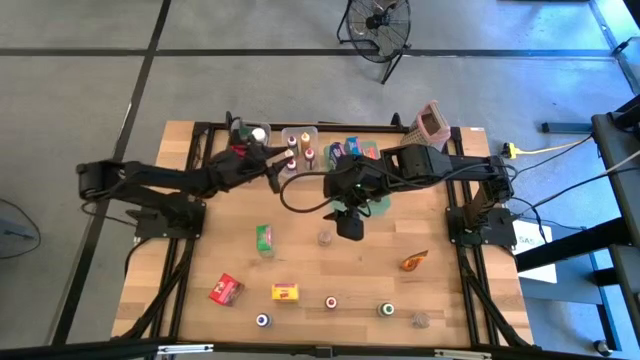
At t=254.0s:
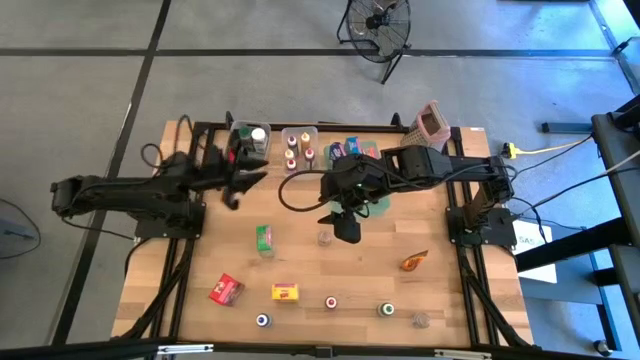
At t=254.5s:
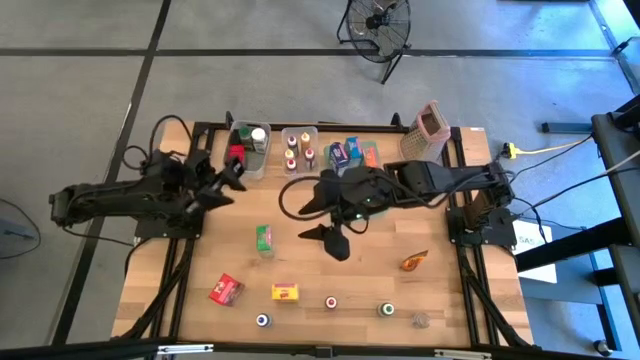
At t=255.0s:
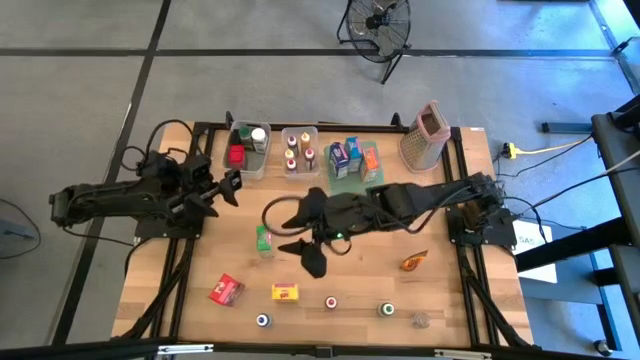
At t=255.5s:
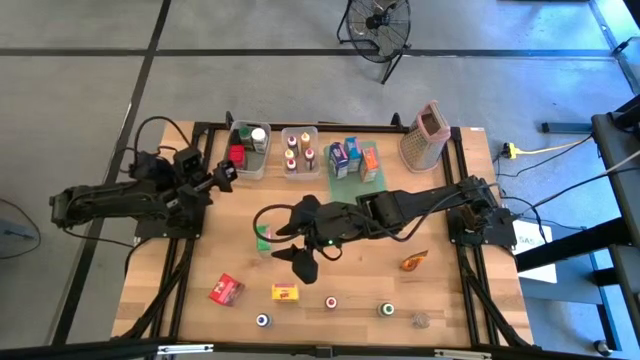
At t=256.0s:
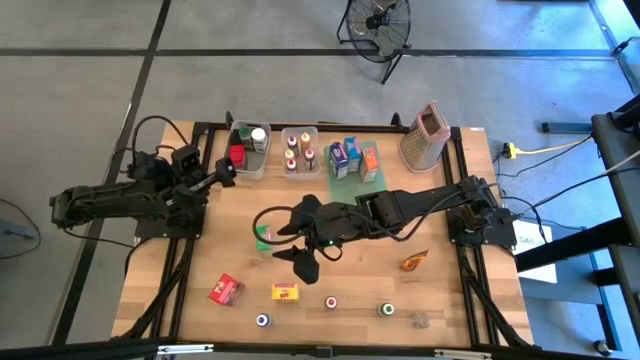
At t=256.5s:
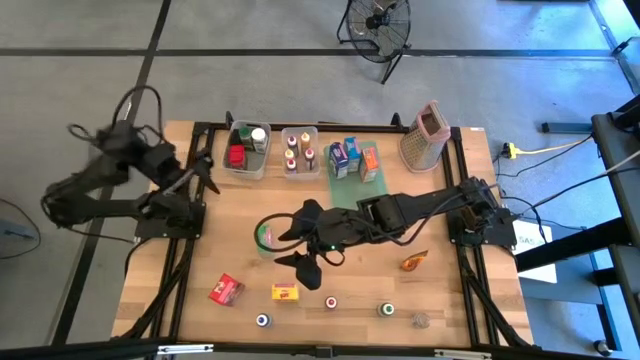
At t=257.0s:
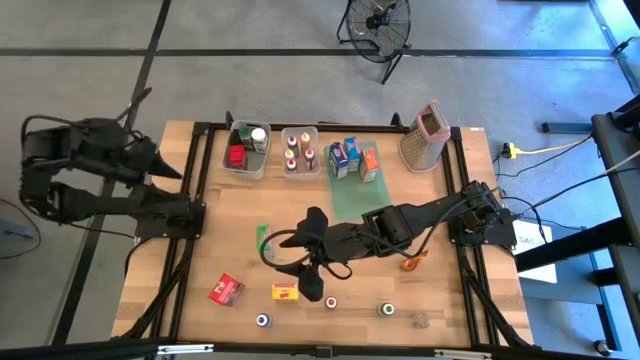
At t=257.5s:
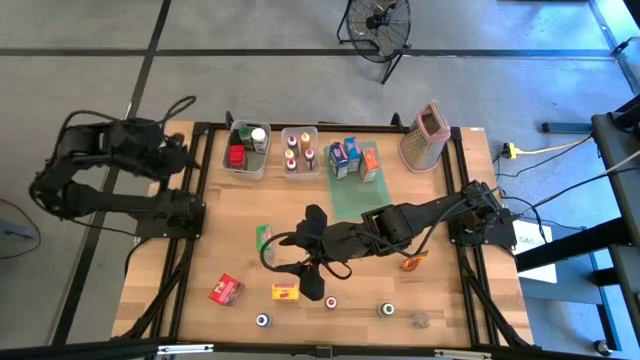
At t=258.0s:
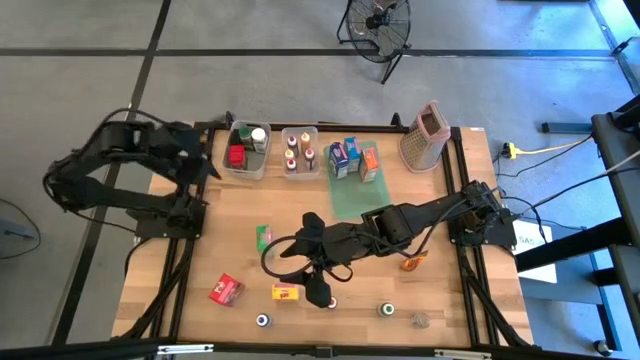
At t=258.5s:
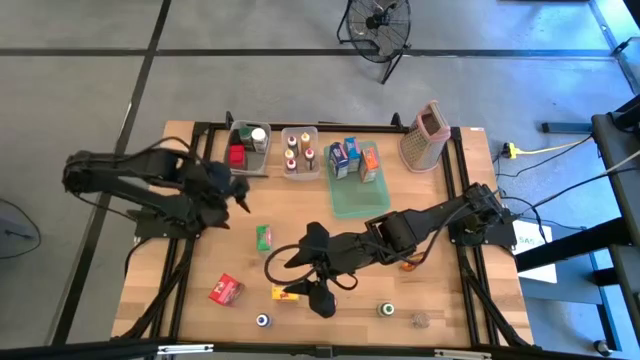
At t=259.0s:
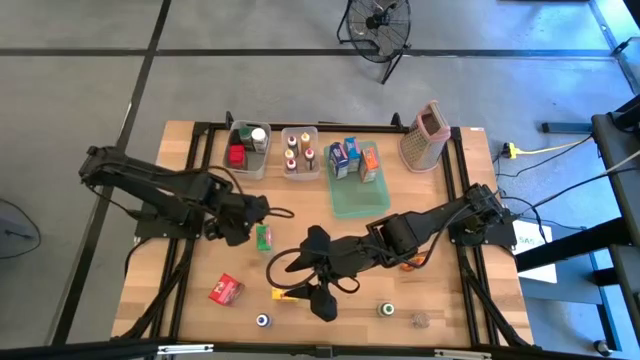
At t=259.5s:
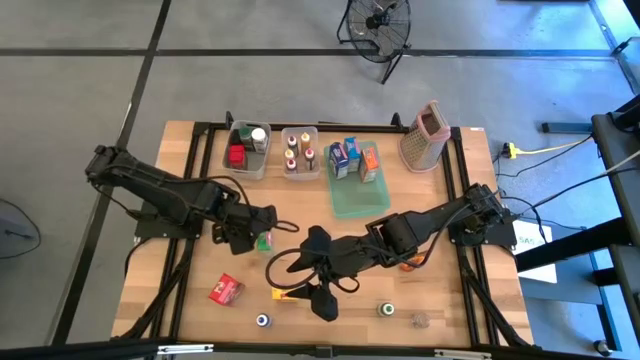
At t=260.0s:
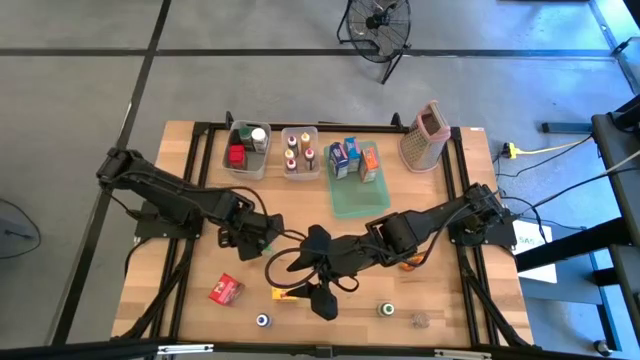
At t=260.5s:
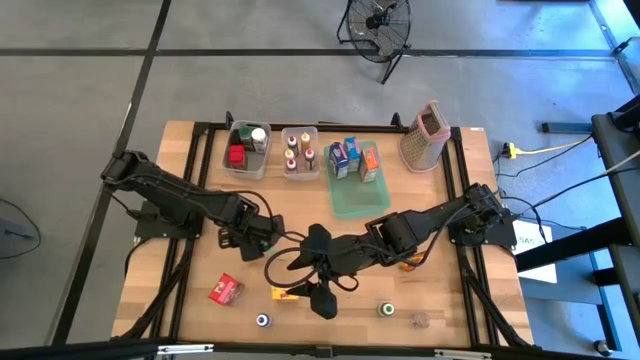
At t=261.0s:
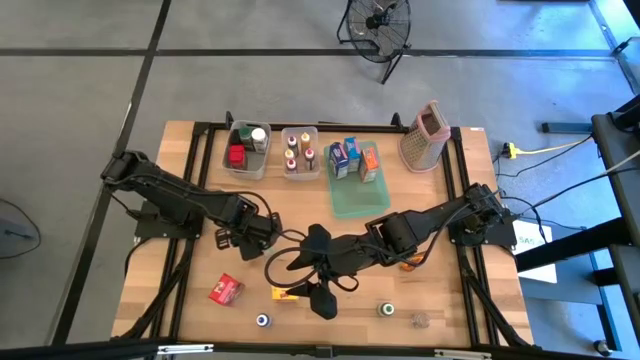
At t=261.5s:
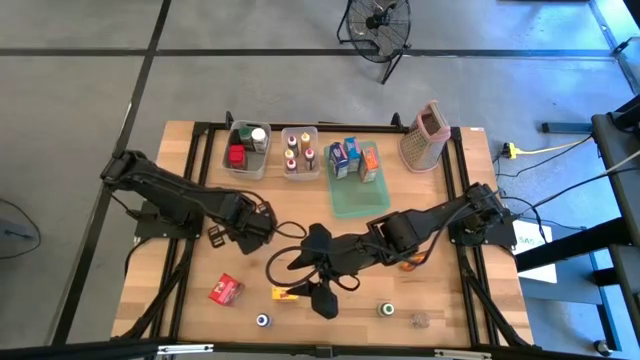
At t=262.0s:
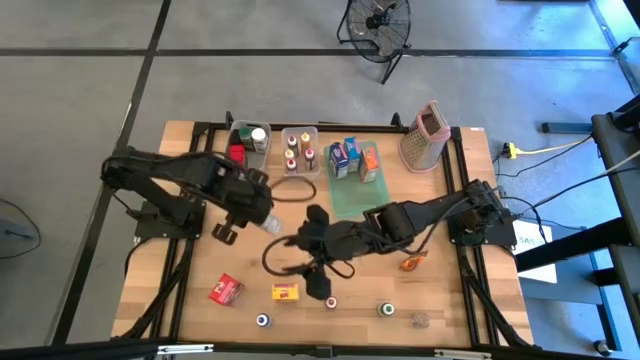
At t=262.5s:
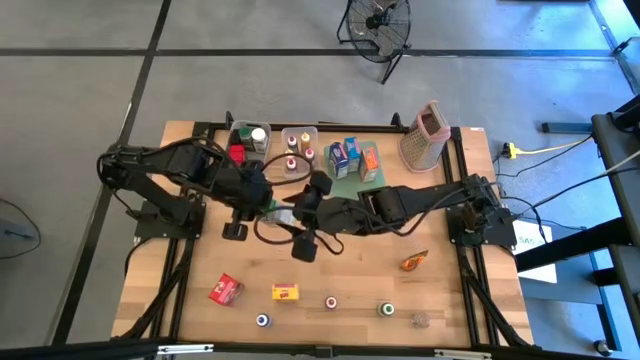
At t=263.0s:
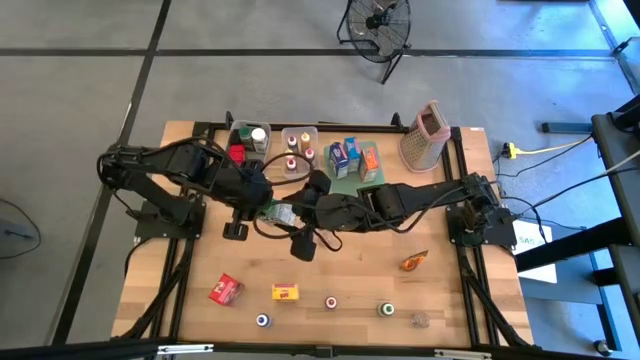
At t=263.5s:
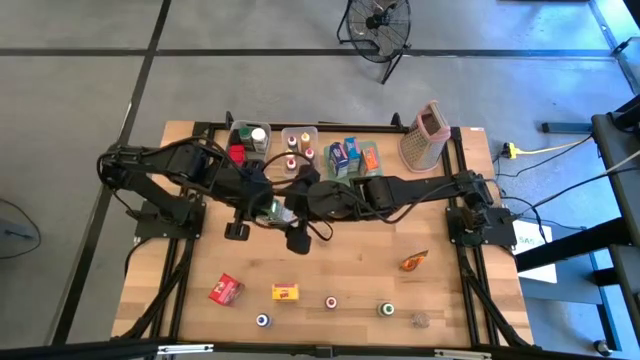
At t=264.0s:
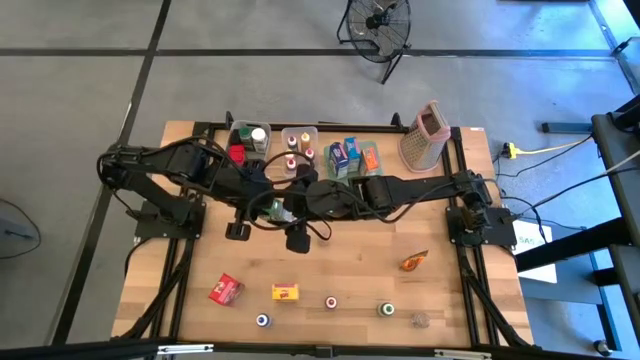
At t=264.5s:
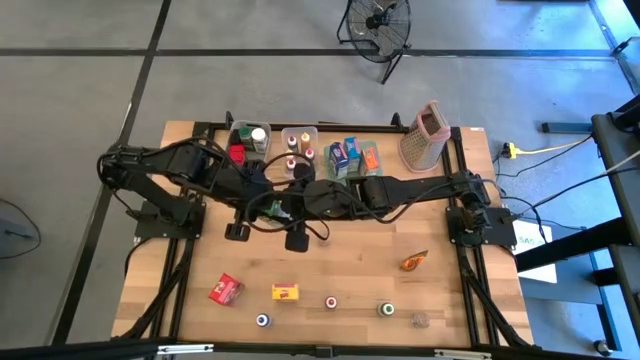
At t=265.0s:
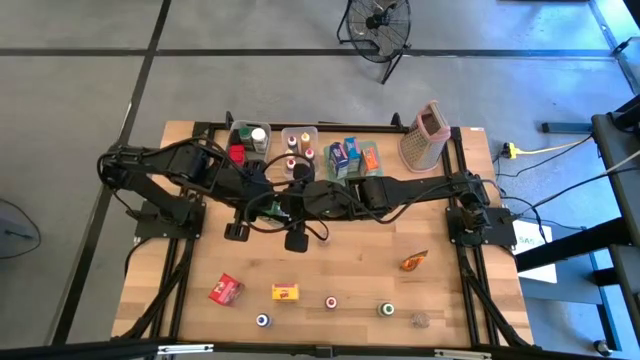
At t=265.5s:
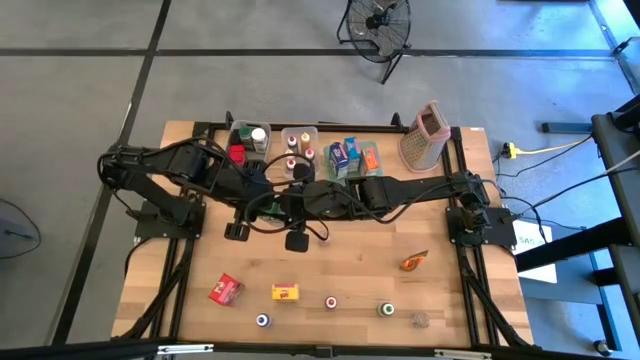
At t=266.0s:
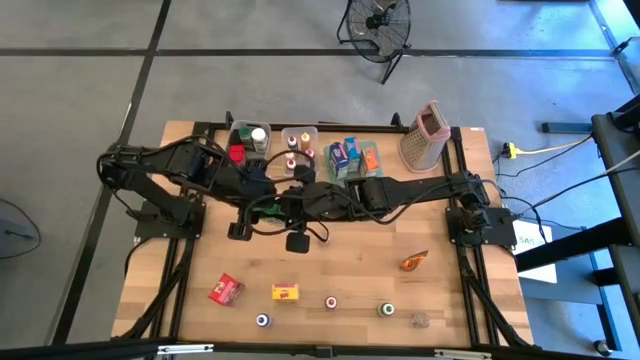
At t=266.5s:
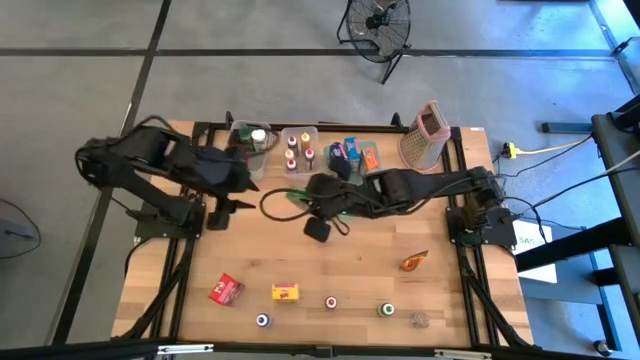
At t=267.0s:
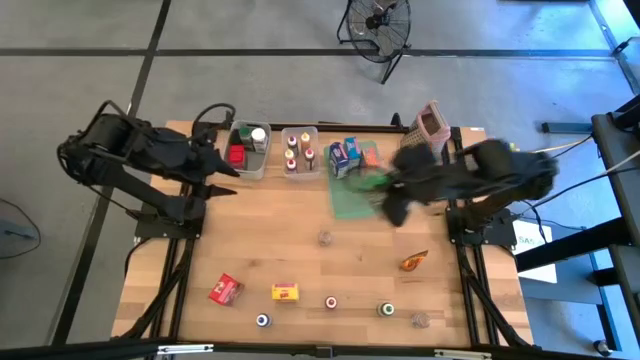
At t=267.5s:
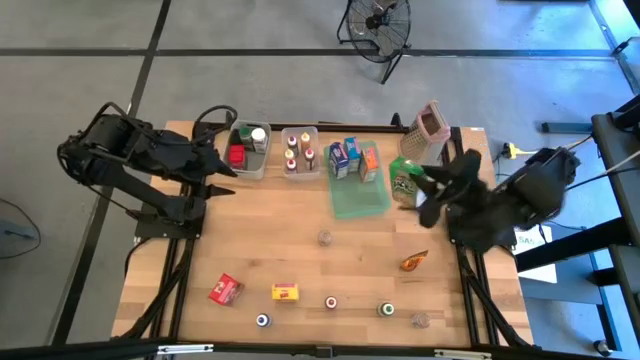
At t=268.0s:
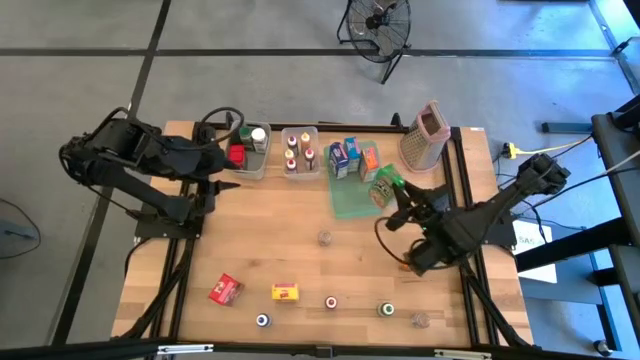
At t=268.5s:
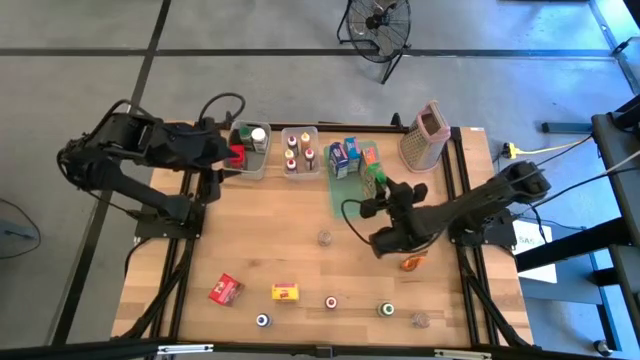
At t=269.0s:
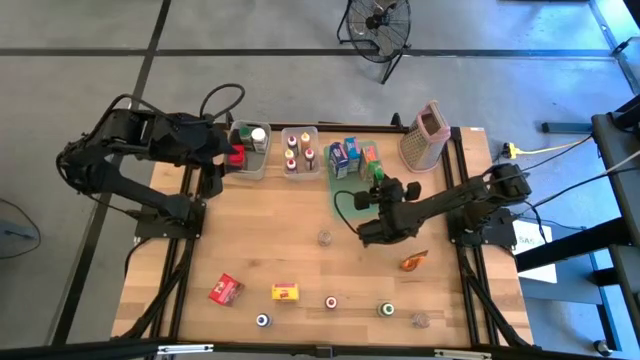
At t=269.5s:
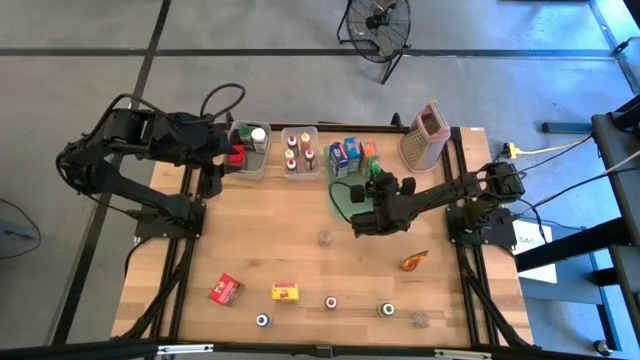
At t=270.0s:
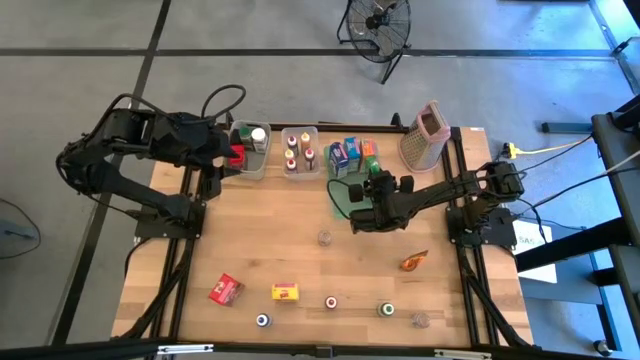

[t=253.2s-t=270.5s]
Task: Pick & Place Kitchen Items
Put the green cereal box into the blue bin

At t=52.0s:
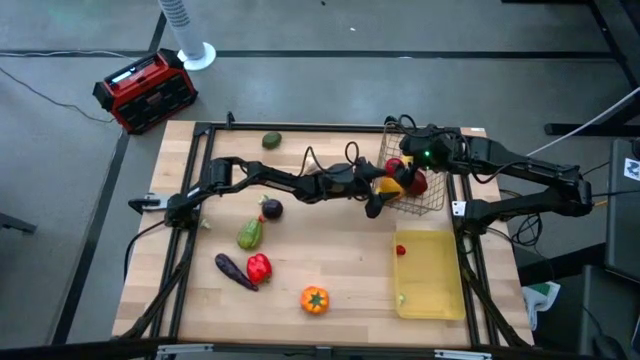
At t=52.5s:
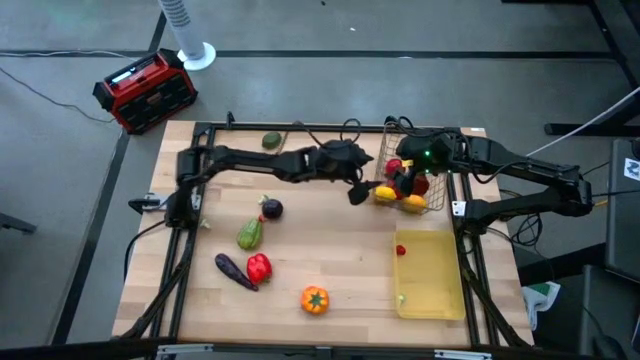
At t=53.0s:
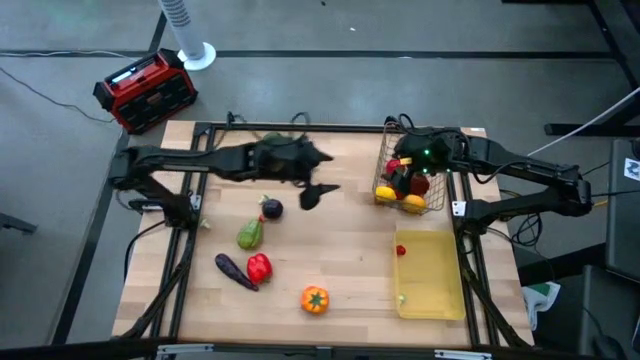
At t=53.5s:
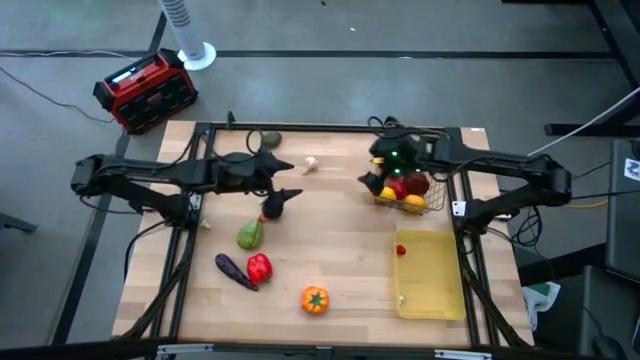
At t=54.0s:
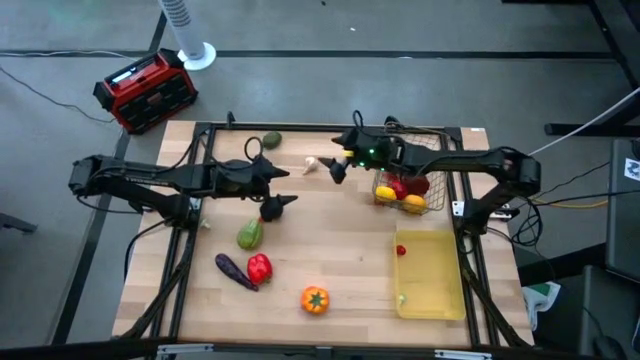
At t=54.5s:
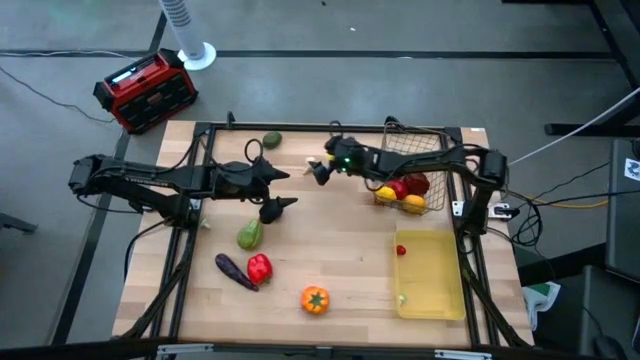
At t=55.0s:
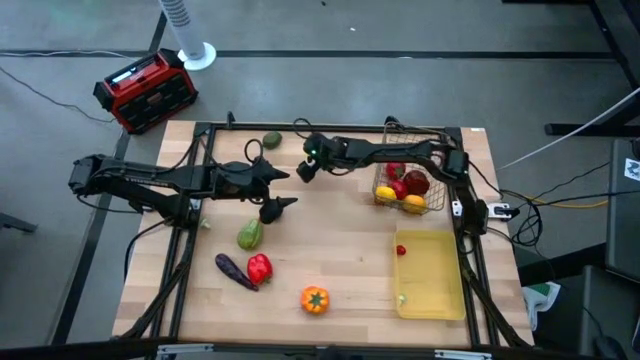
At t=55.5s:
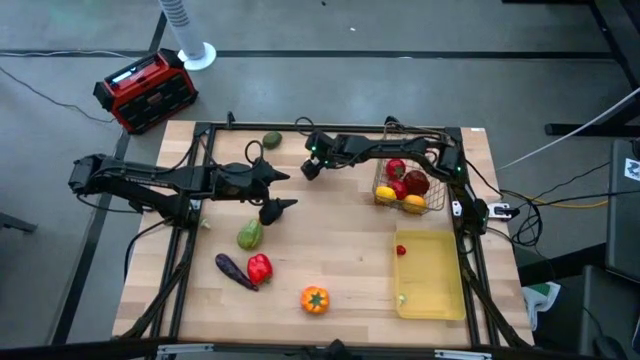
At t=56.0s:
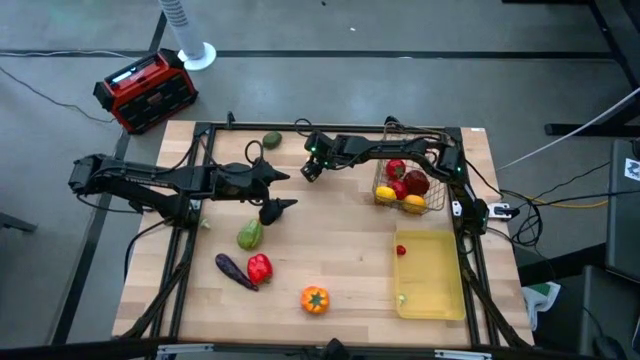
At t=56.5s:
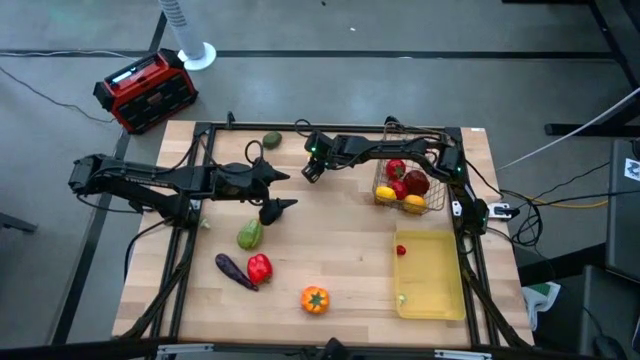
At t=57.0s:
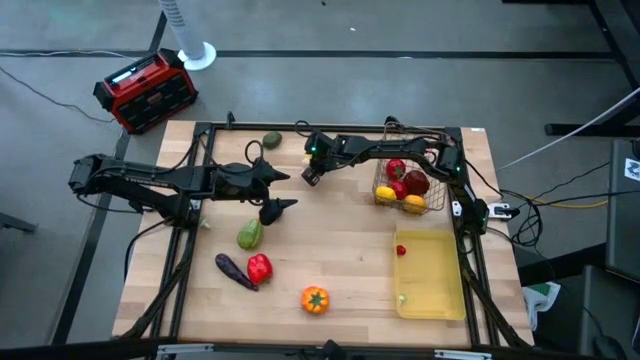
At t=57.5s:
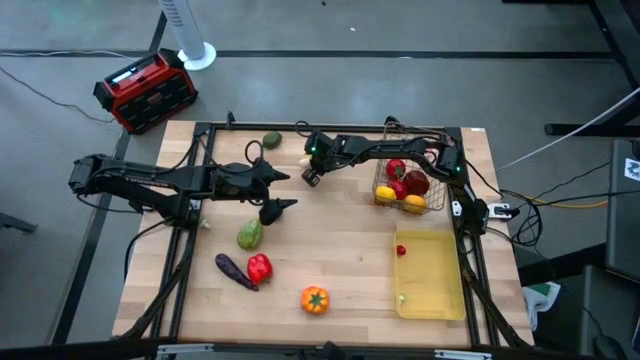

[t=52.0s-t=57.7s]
Task: Sort produce into baskets
Put the garlic into the yellow bin
